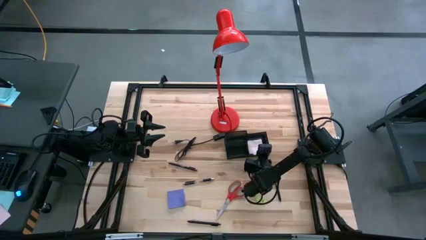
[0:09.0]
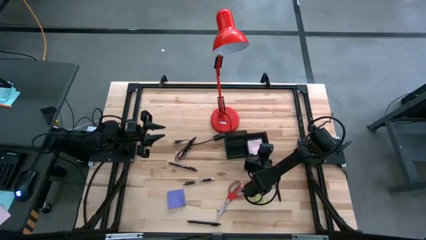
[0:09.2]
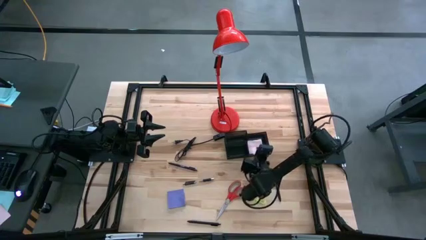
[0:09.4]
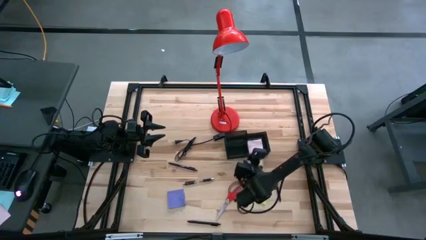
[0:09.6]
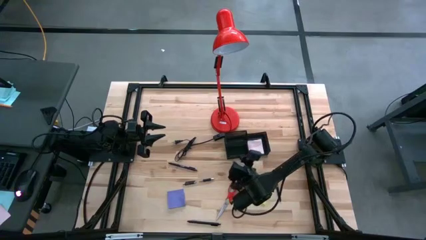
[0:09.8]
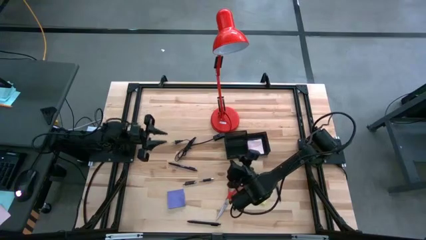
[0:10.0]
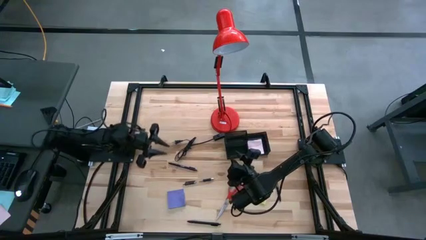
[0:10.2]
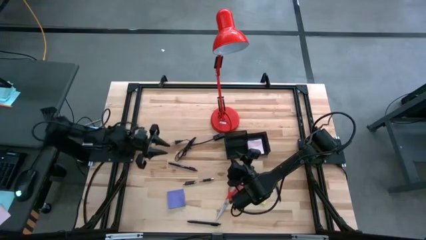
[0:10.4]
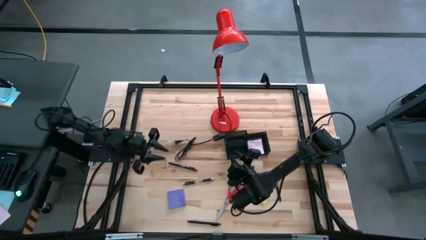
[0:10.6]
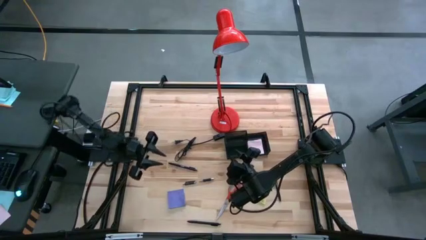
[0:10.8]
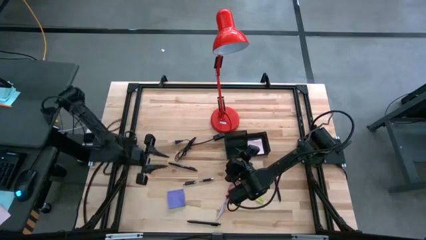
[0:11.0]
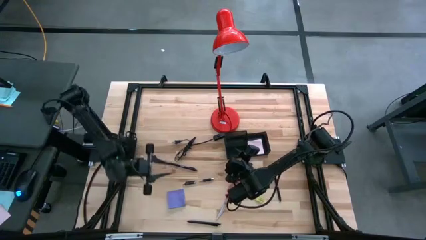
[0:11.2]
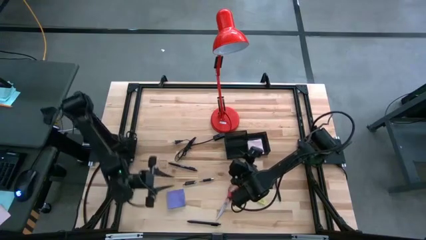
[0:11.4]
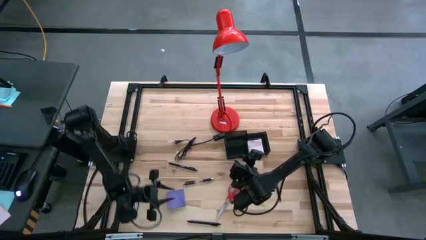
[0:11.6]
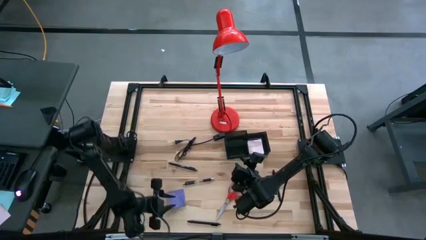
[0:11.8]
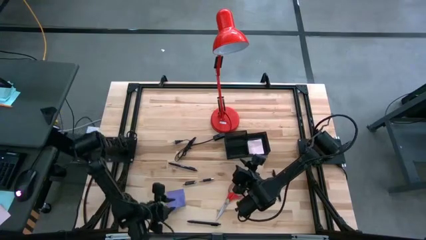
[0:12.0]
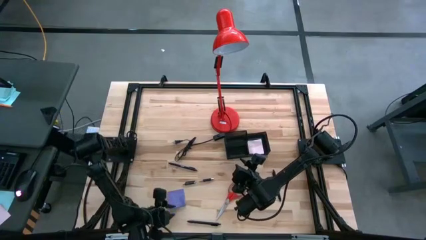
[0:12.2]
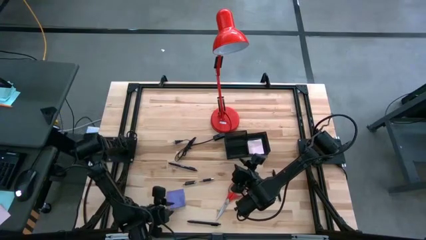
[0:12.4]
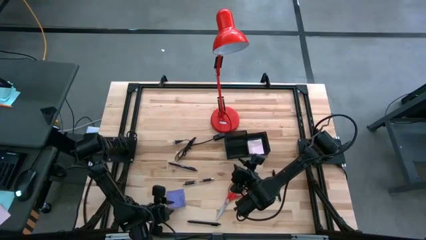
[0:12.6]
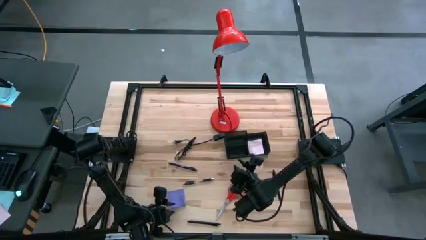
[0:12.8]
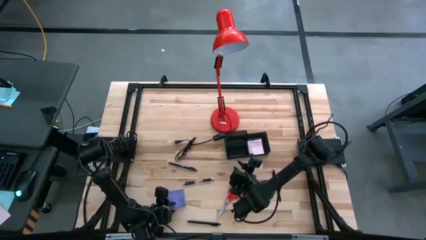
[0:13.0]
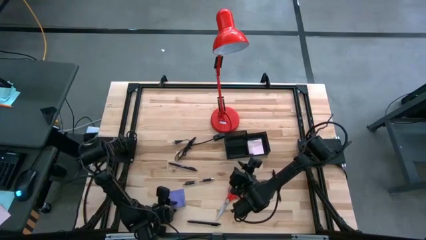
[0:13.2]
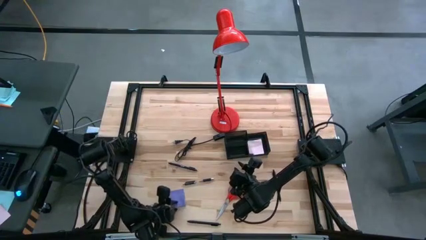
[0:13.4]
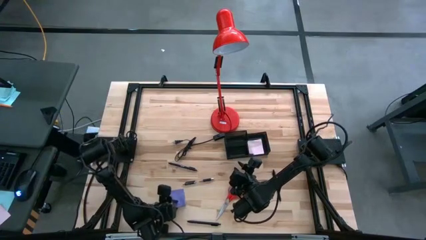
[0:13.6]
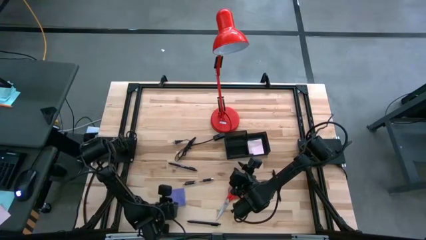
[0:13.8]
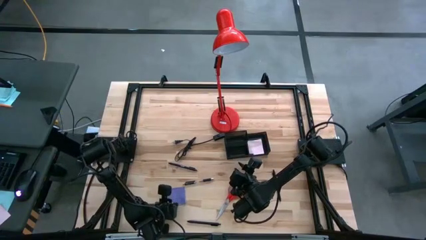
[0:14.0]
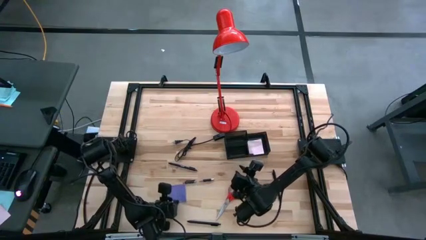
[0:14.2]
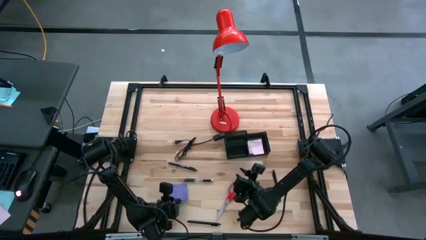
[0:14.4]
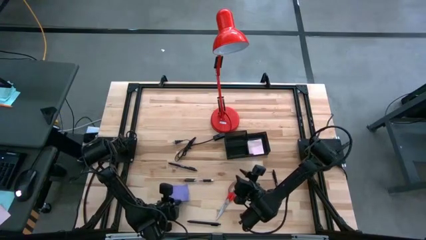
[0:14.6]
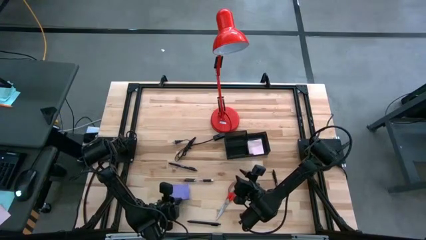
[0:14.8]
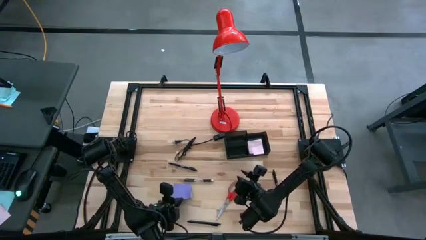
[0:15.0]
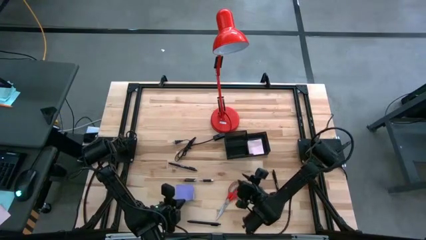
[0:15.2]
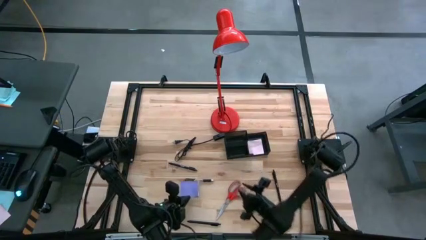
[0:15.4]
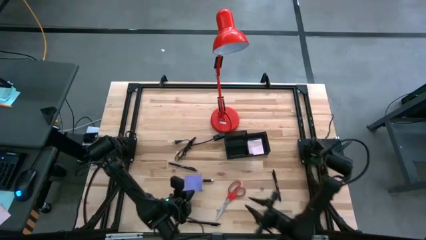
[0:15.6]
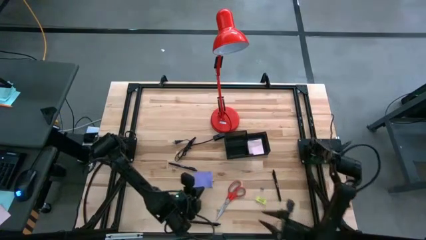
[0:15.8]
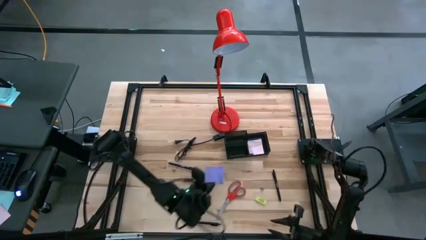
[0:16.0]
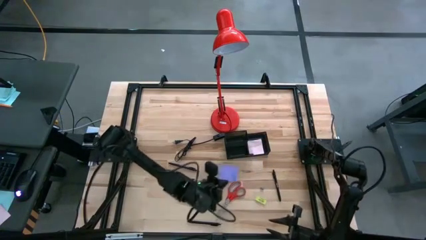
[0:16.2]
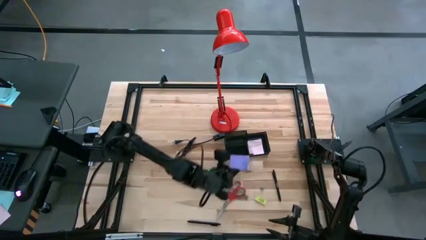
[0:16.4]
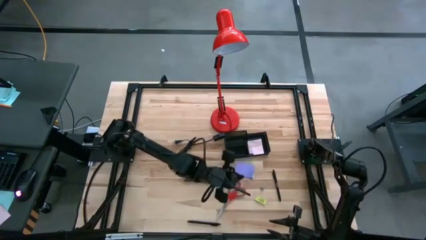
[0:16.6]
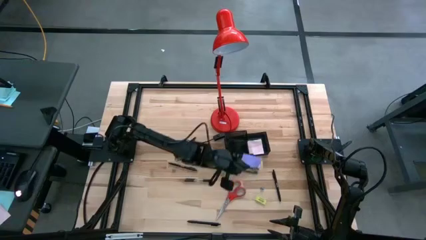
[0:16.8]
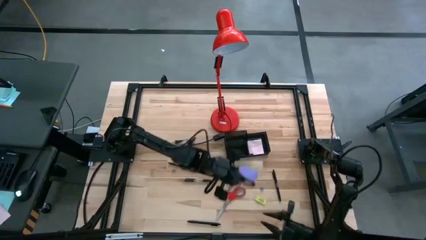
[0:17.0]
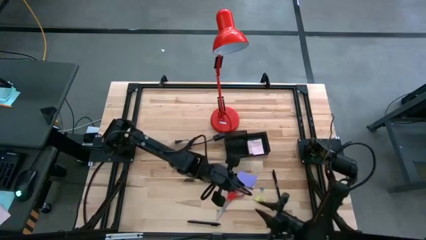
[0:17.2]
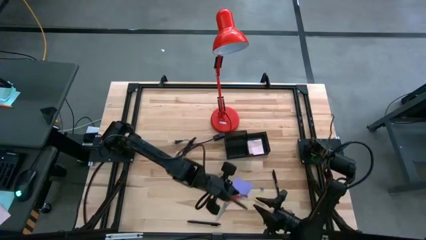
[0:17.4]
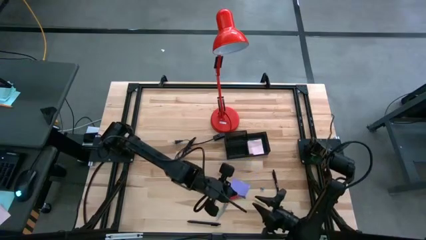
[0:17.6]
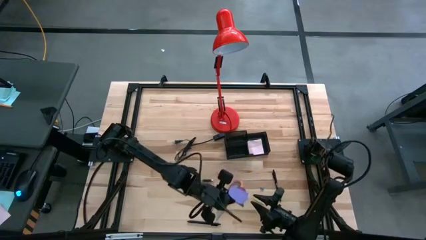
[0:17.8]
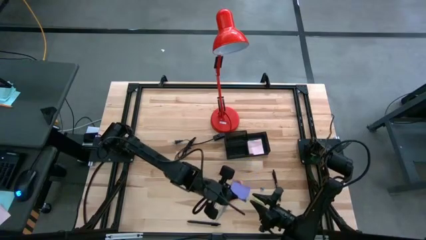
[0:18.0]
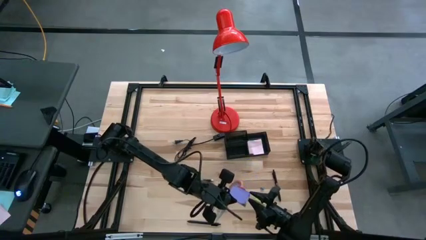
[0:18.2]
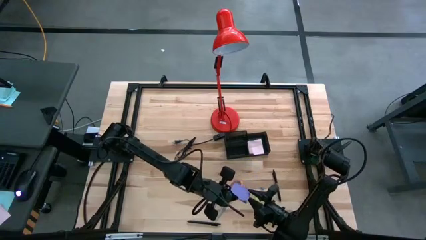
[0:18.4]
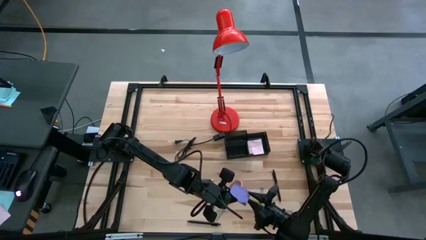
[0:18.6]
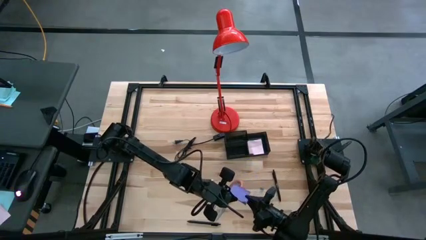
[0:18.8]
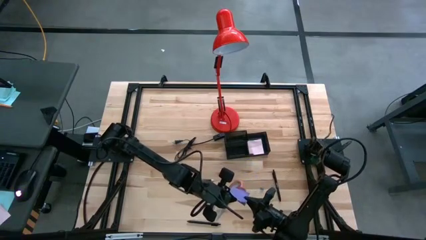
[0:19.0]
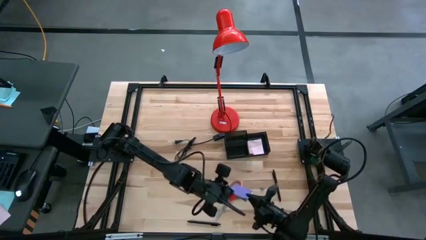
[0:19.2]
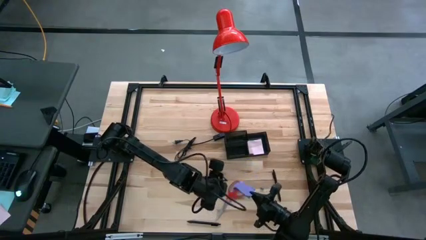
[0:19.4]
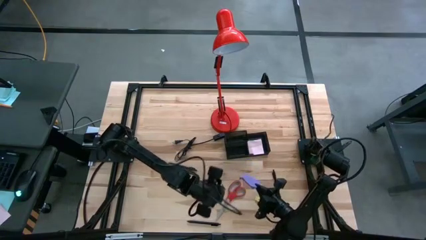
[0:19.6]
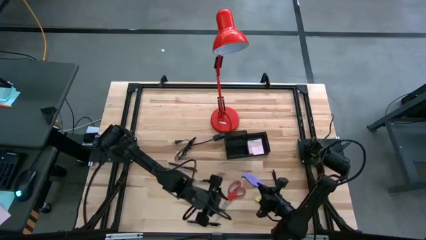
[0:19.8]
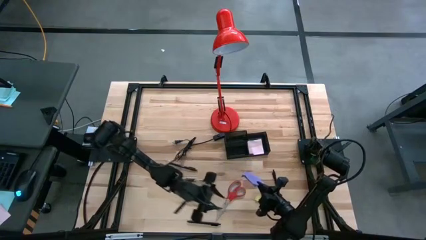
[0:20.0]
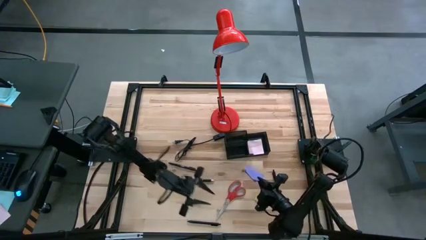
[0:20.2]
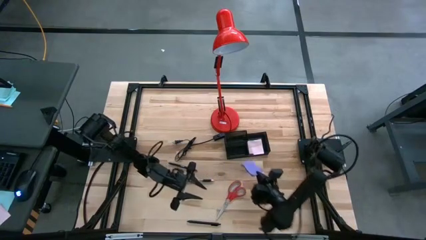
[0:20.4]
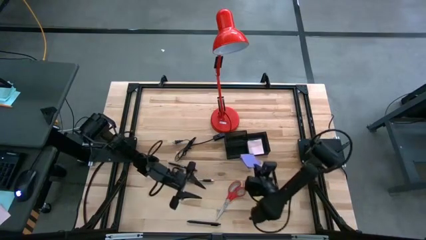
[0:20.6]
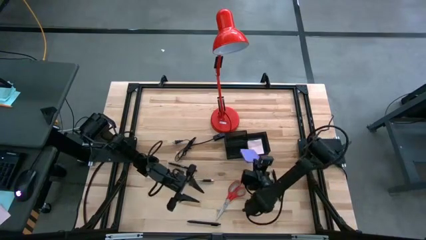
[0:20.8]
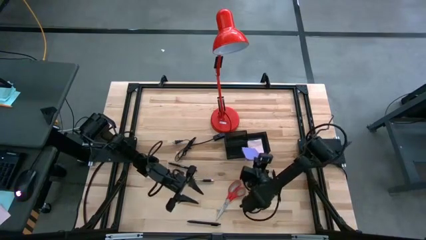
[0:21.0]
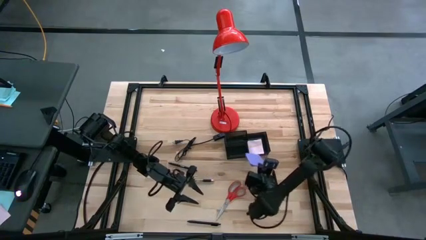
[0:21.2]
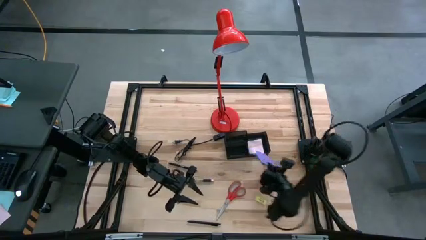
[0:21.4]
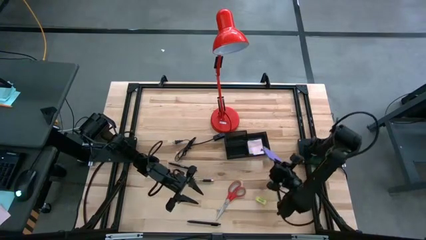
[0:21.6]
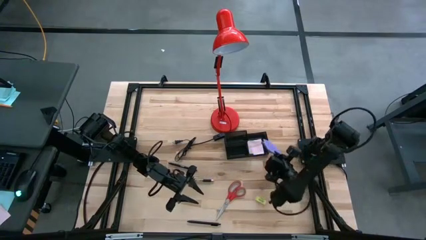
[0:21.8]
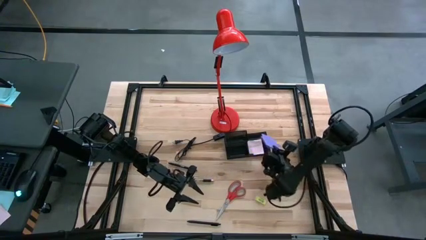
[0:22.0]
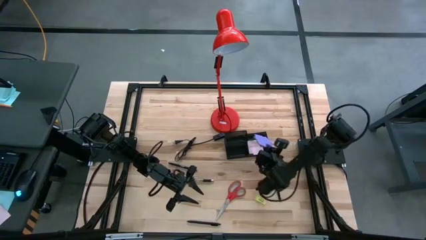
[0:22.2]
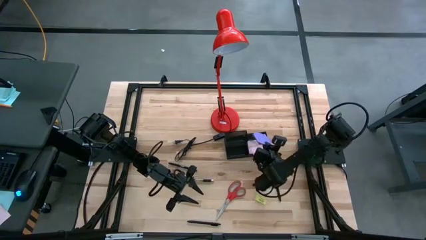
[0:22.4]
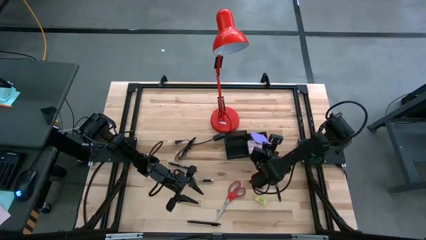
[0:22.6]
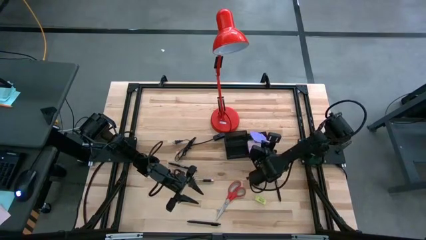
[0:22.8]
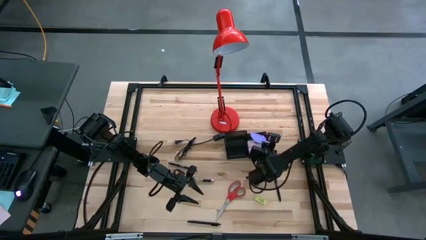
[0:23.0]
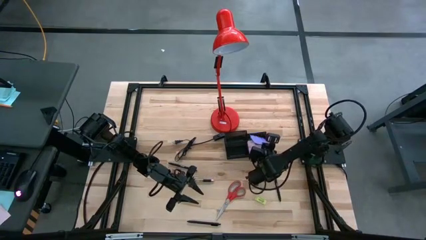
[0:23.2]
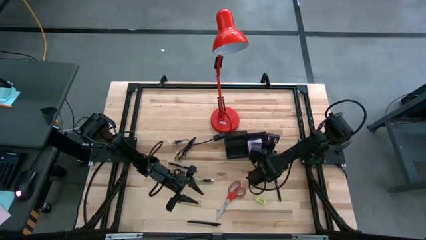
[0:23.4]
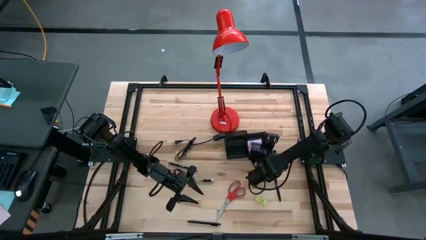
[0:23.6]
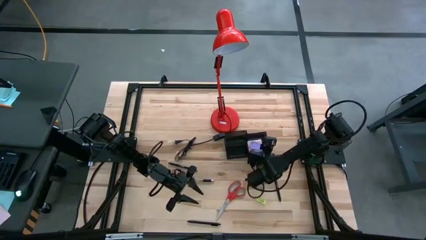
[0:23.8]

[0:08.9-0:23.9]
Task: Pick and place office supplies into organizer
Put the purple sticky notes into the desk organizer
